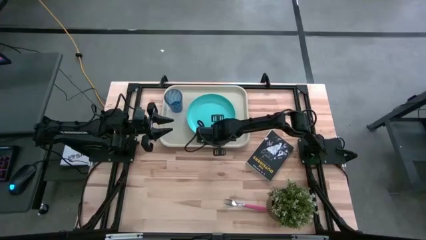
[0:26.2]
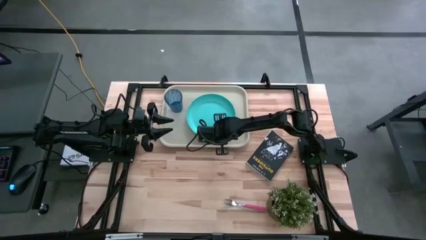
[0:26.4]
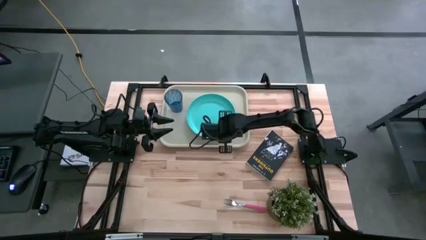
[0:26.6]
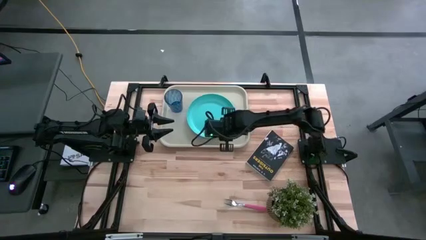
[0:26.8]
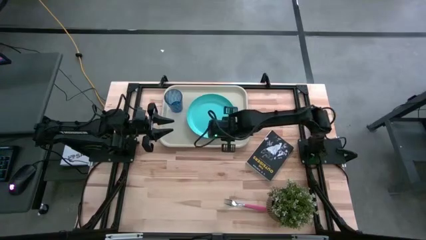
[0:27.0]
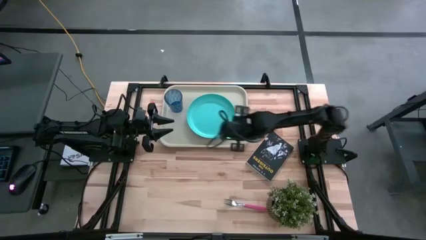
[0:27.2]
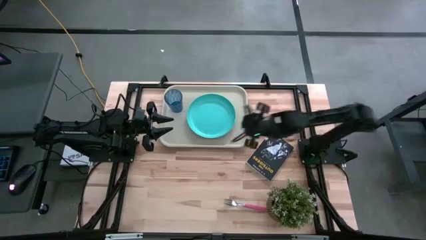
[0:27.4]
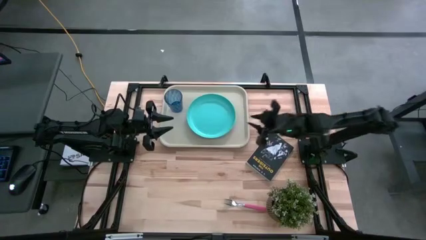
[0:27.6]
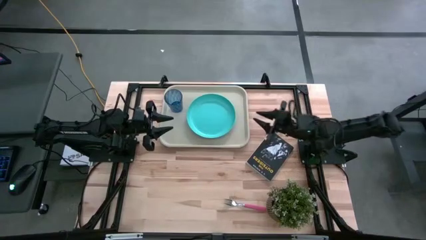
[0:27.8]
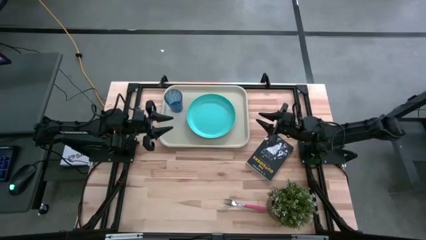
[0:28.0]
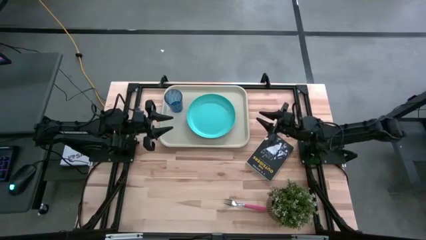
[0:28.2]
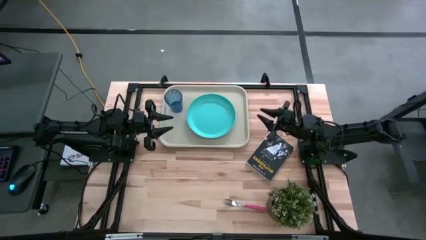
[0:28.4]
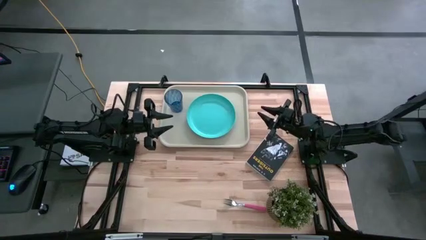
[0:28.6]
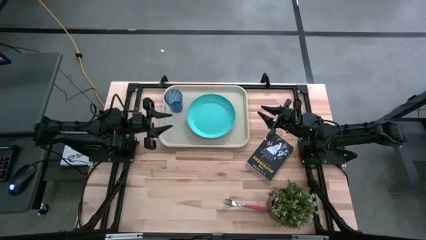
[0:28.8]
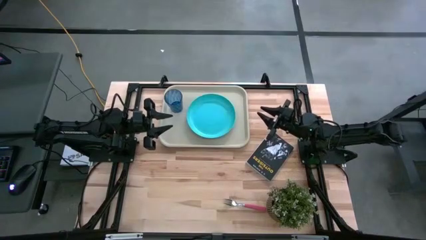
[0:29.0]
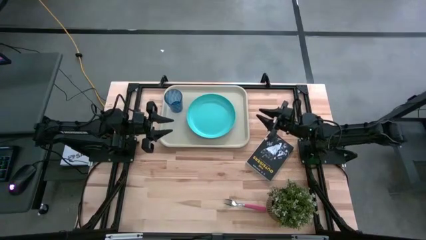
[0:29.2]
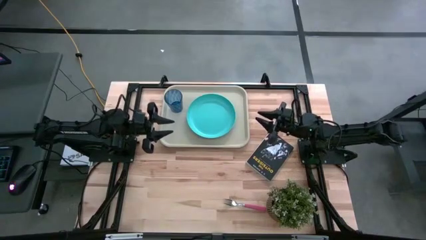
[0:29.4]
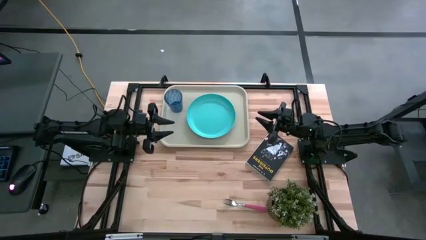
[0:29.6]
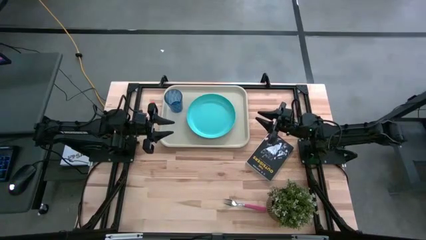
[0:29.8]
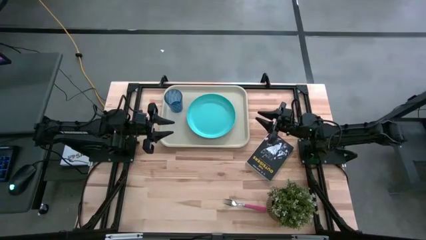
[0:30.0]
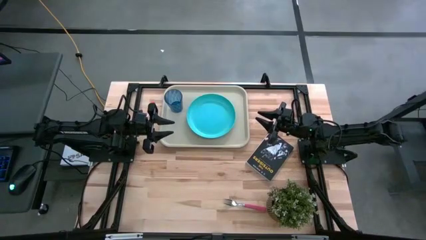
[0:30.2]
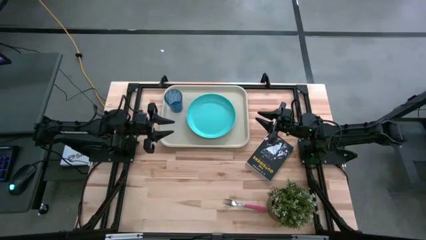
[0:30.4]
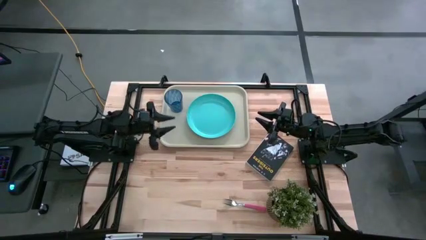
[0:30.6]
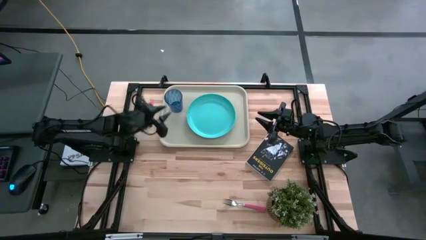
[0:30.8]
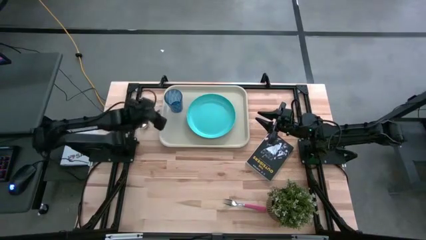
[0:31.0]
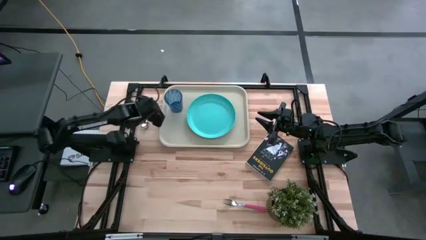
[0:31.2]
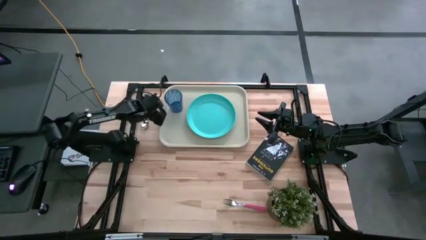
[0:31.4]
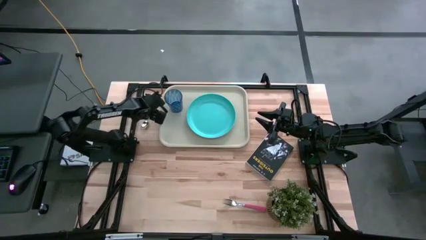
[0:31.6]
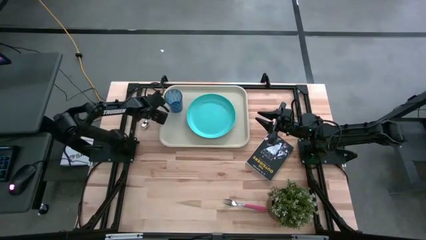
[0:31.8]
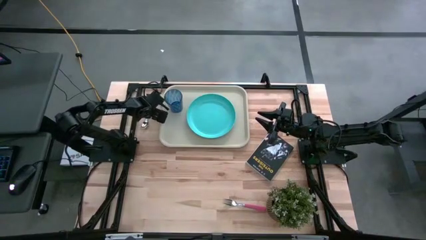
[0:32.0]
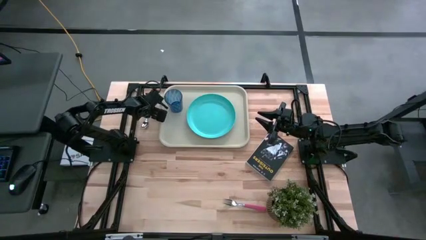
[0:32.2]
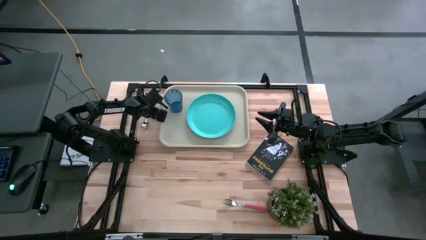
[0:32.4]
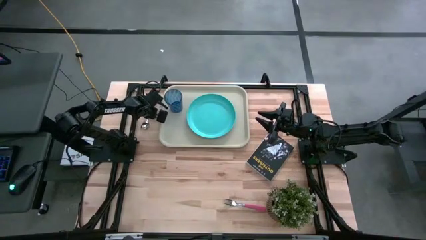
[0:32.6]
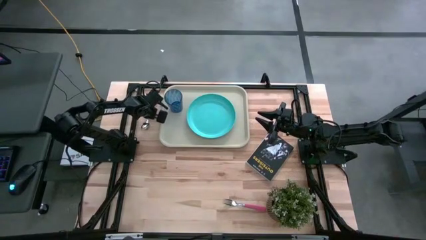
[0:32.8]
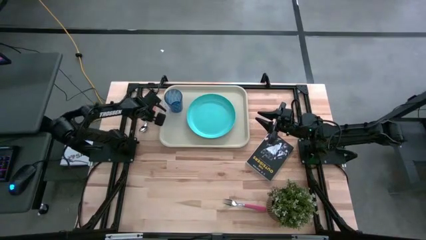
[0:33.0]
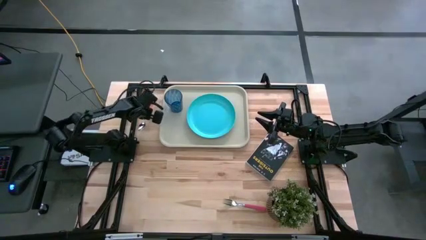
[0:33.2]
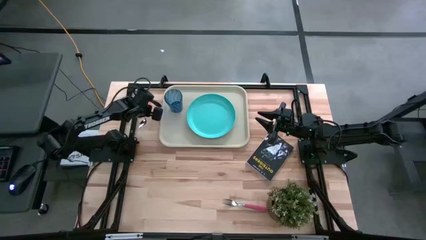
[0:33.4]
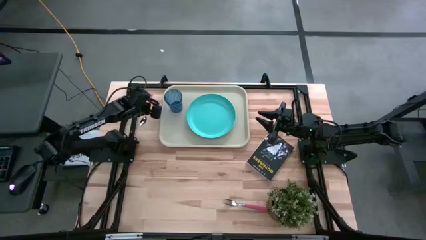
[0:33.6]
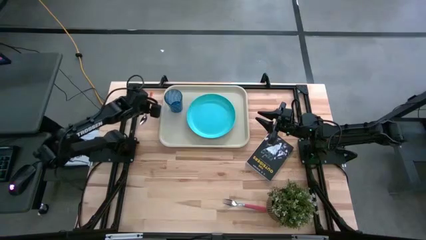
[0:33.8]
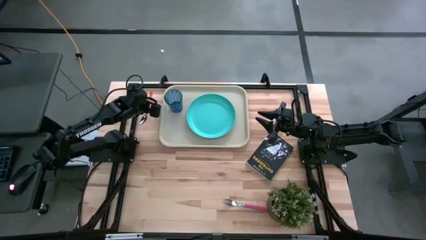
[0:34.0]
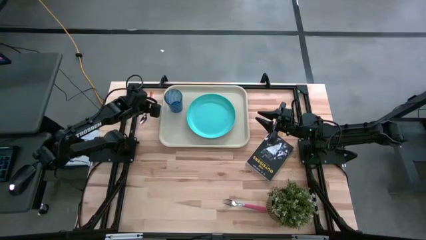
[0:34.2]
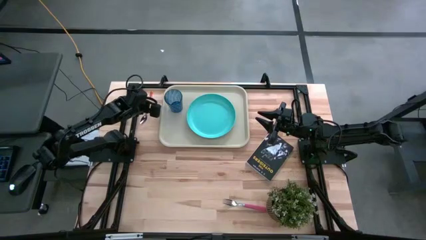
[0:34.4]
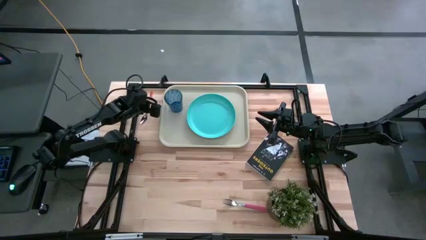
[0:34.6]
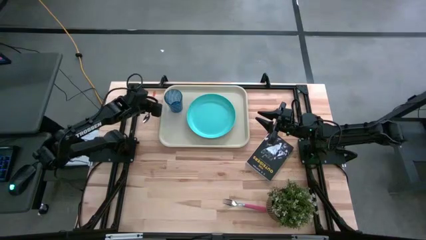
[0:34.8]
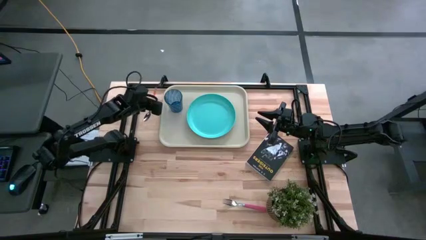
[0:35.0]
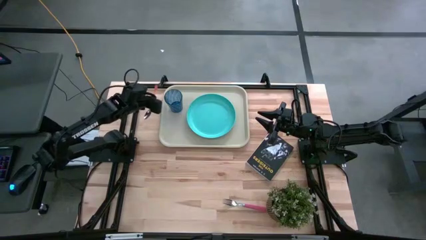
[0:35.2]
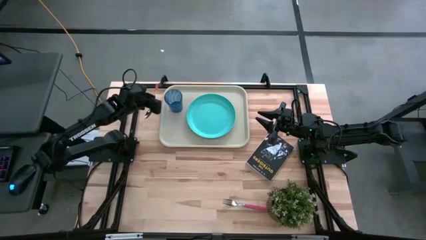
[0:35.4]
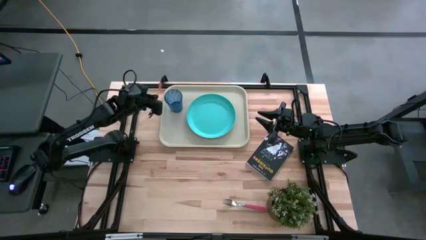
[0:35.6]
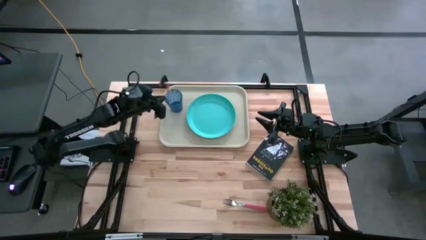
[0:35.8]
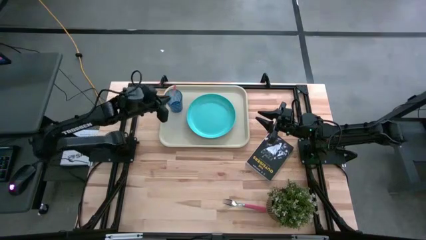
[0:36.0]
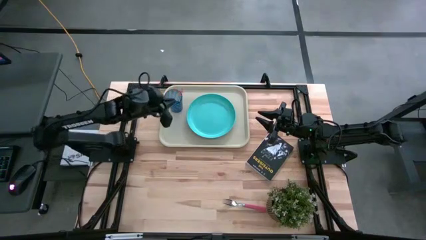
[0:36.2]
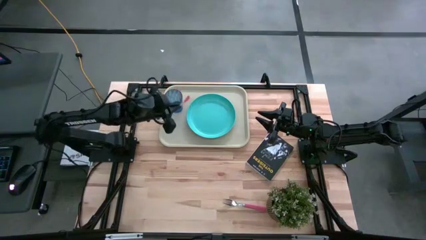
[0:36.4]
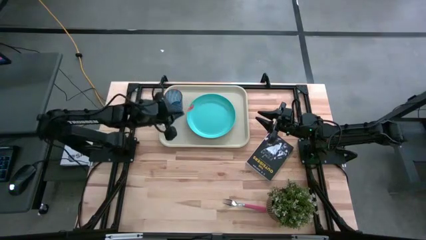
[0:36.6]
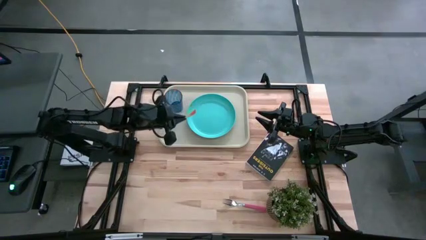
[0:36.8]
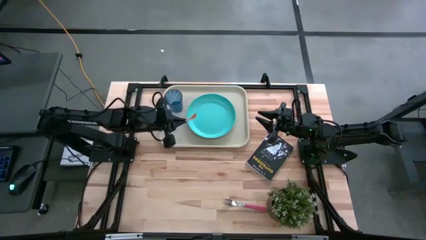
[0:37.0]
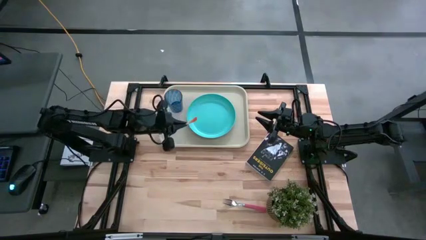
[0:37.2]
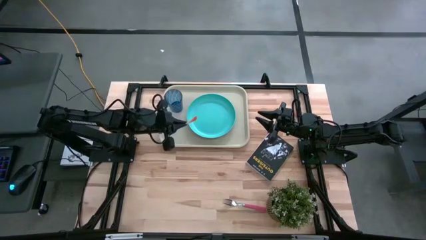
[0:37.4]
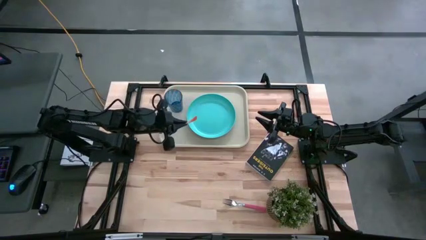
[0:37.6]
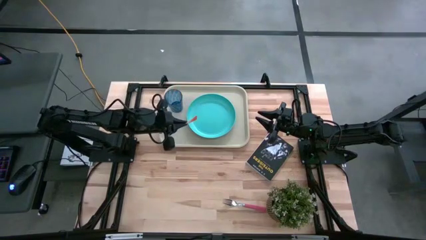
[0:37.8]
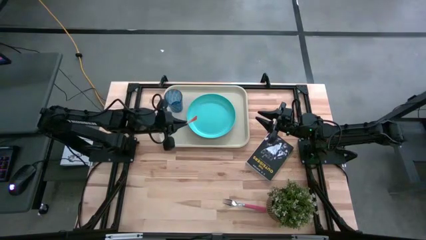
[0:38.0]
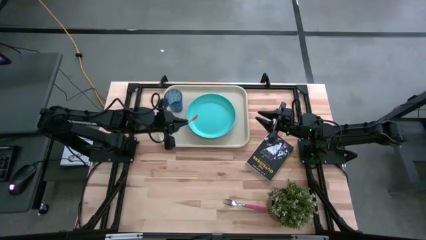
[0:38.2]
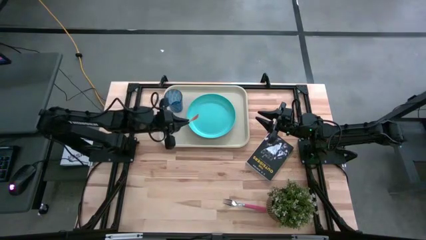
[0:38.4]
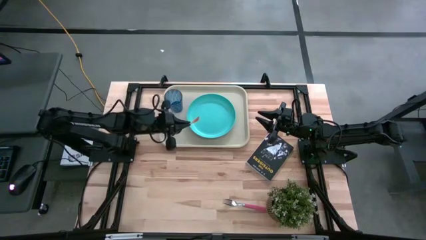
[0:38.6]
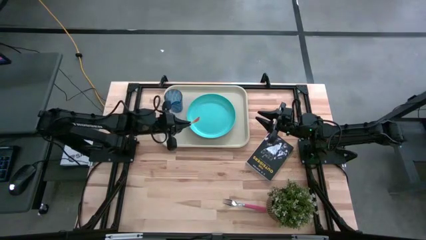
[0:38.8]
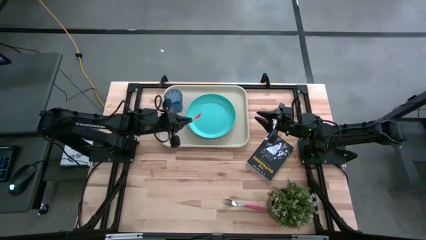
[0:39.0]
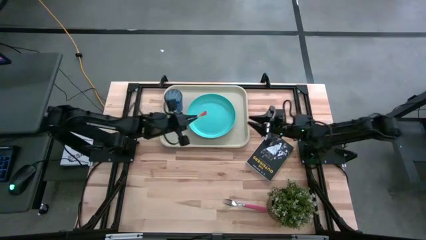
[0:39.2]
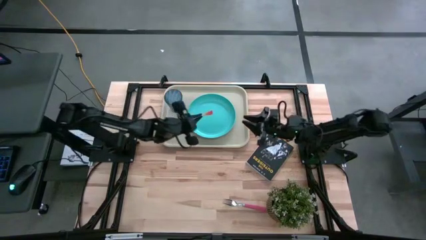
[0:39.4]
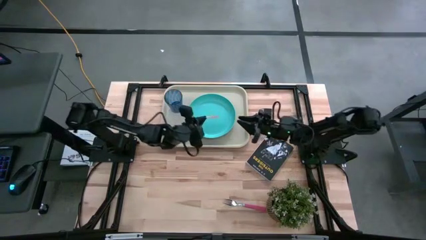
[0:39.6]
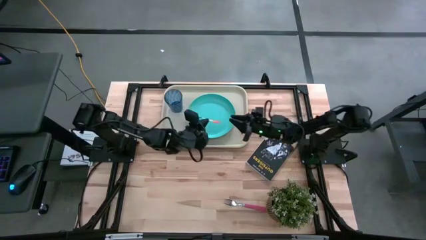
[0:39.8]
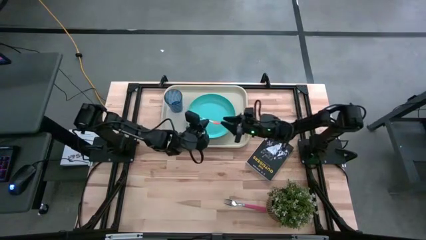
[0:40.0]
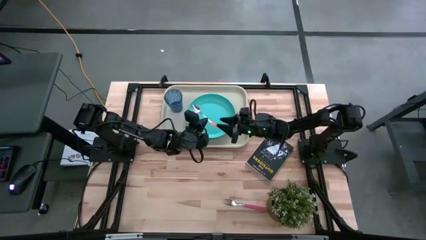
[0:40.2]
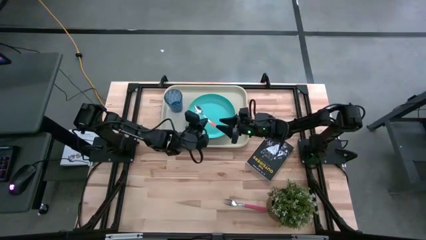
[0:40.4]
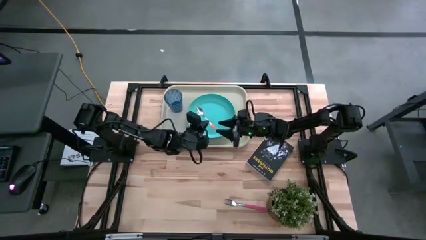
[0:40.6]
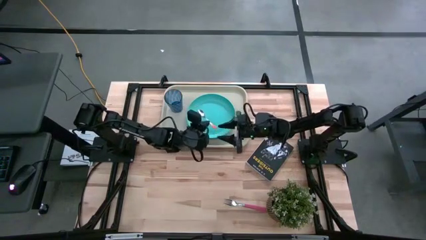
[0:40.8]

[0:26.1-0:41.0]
Task: Pick and place plate/cup/fork/spoon on tray
Put the orange spoon on the white tray beside the light blue plate
